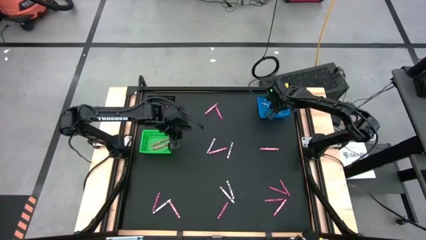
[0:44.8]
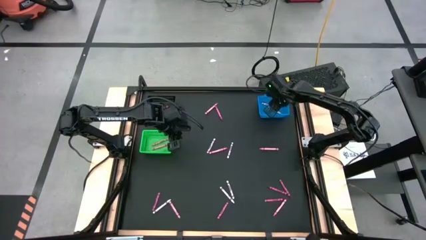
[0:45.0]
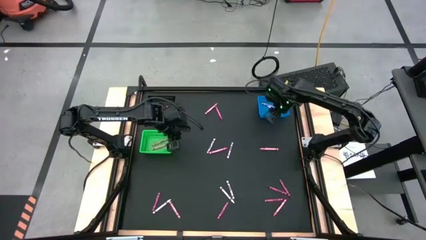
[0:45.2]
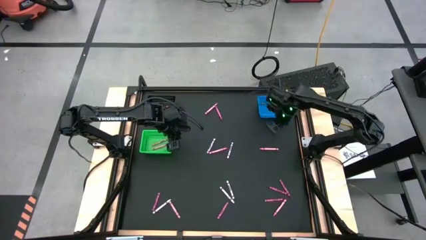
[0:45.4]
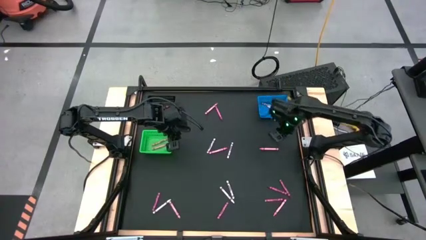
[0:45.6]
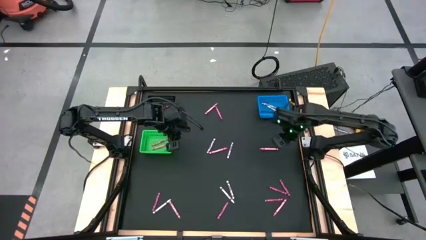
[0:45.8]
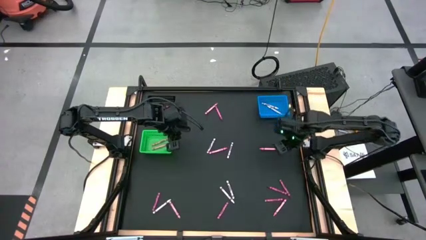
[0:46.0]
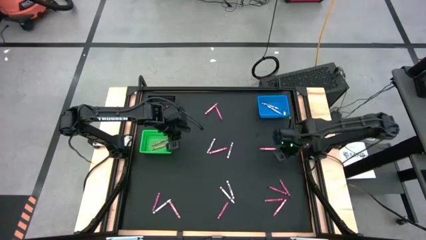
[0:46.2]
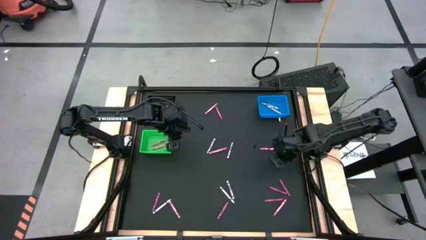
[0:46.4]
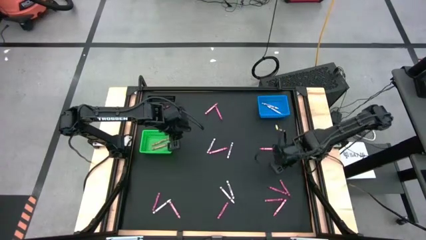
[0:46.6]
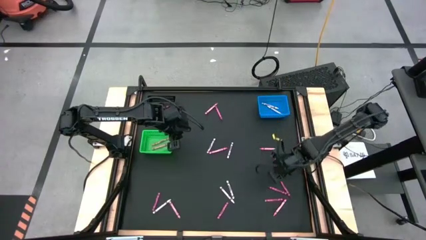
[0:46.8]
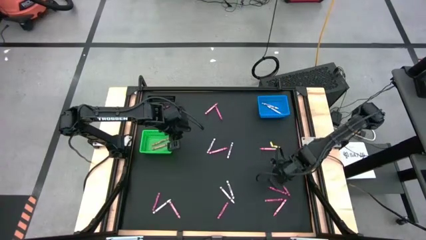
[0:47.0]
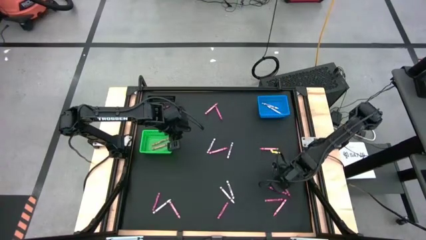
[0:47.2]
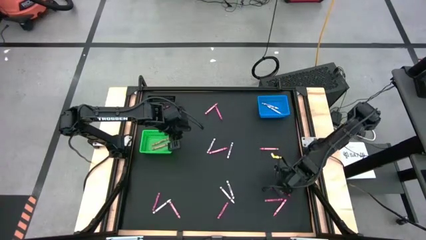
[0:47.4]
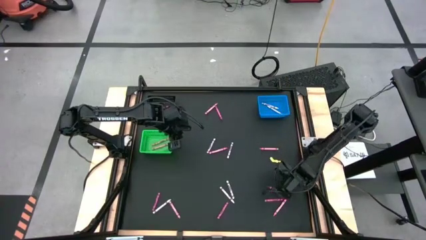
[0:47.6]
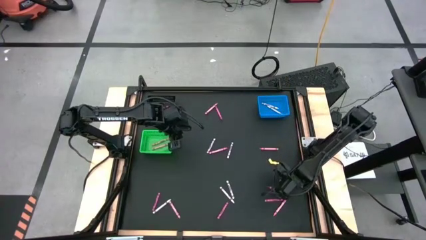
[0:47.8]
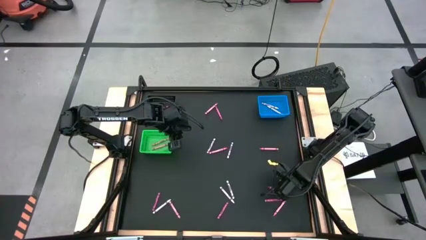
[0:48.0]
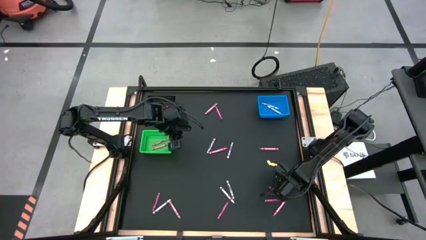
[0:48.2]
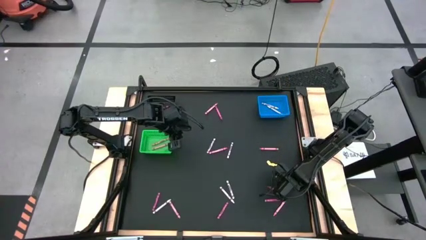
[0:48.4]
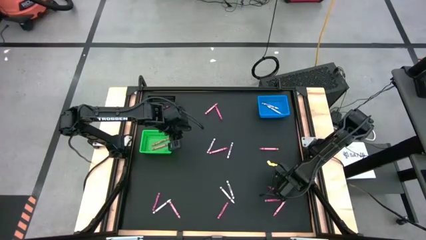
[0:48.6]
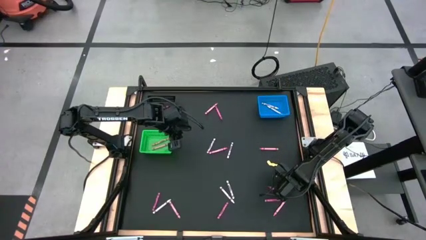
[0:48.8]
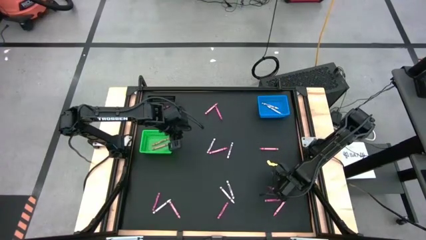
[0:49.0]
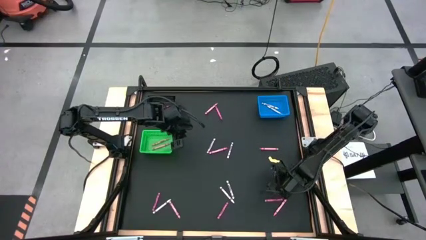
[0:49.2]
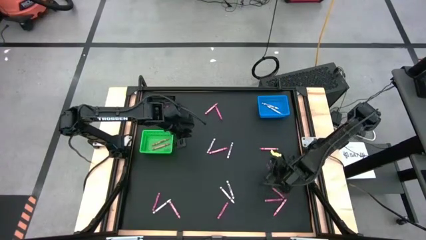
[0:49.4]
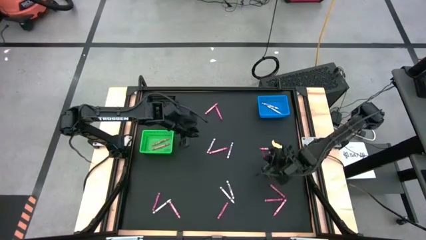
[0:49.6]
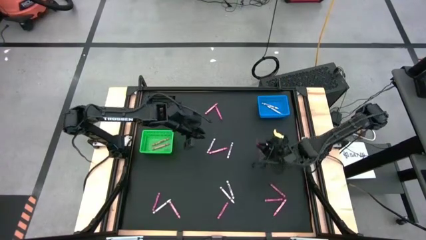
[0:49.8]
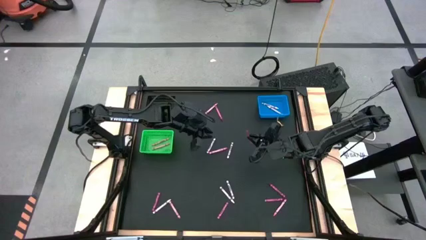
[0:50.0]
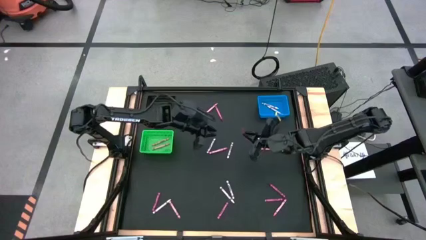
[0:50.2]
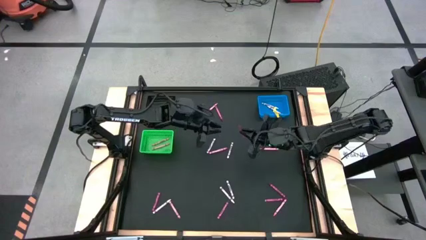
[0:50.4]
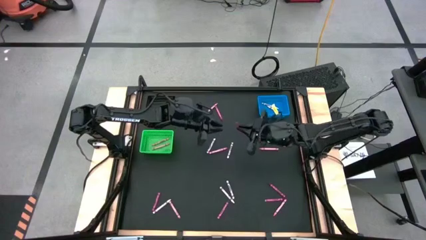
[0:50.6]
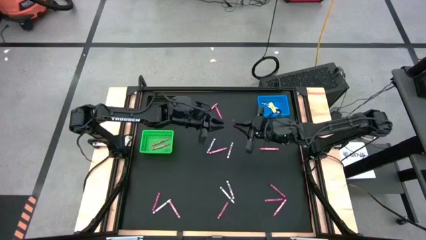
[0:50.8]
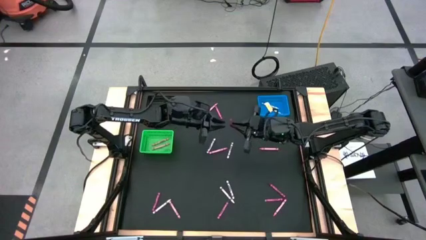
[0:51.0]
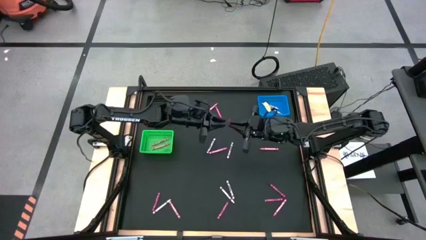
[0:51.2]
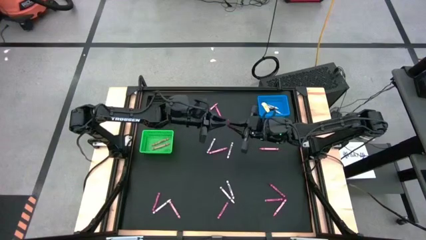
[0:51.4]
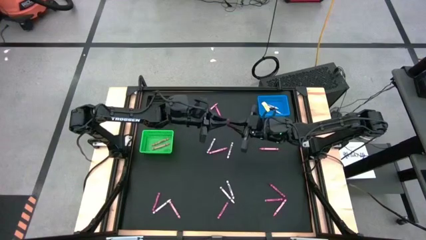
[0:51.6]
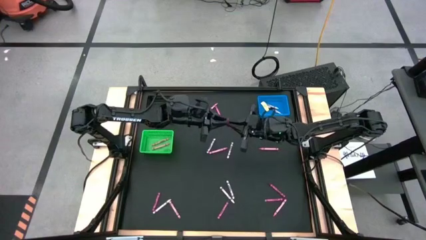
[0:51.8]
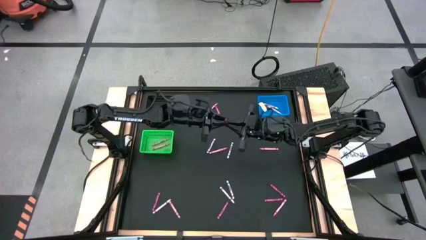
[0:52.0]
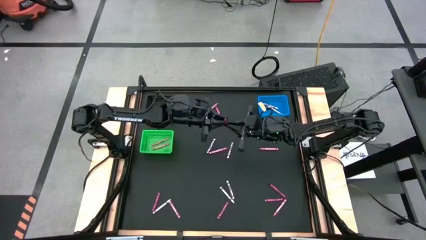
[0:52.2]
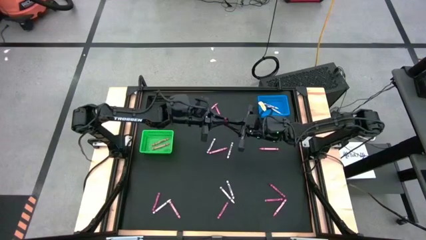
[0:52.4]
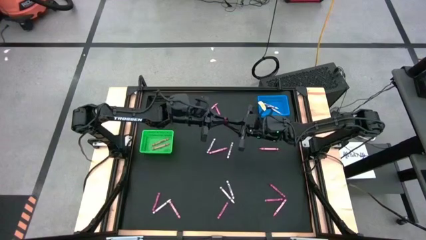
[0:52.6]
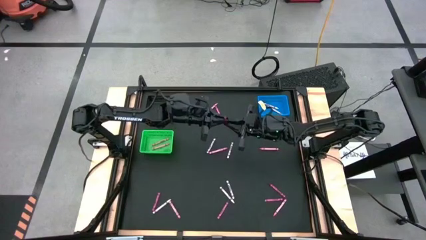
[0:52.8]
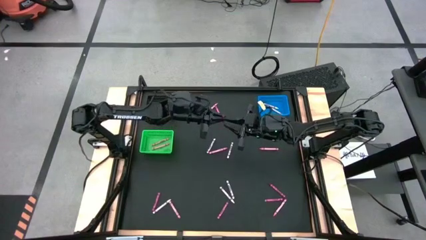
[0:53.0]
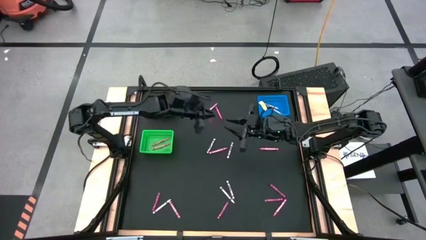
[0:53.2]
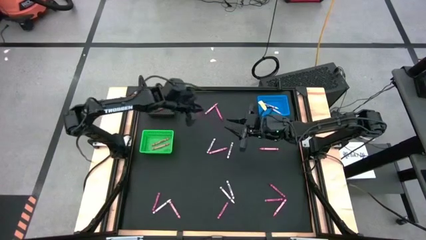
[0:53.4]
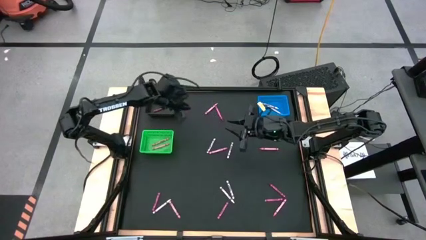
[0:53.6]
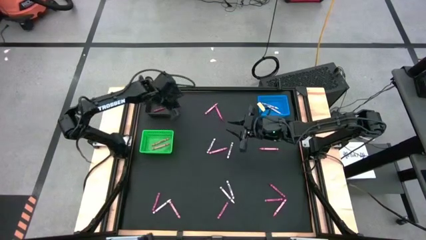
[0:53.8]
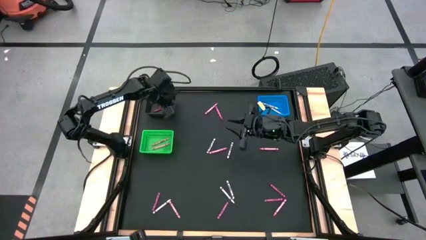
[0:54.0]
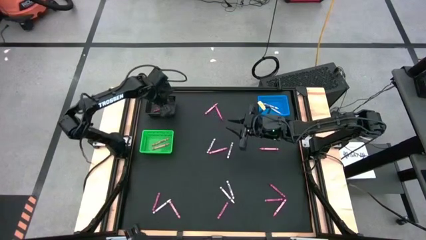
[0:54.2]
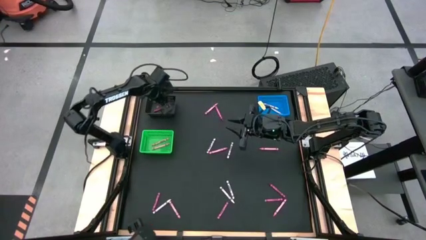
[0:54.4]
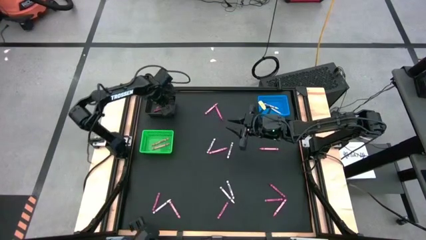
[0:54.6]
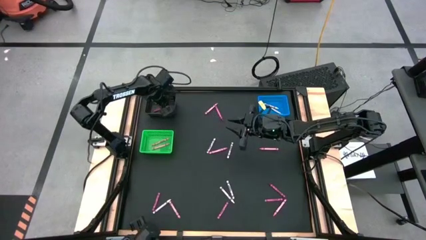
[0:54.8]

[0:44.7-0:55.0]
Task: Sort crayons
Put the red crayon into the black bin

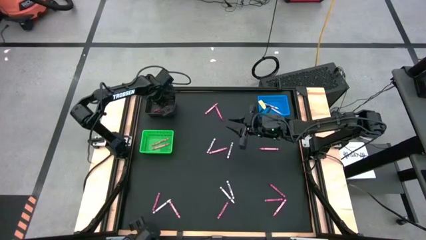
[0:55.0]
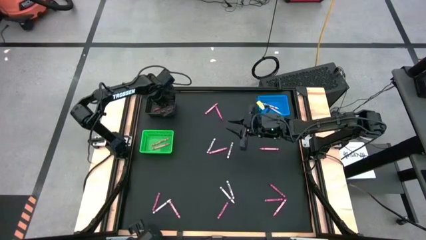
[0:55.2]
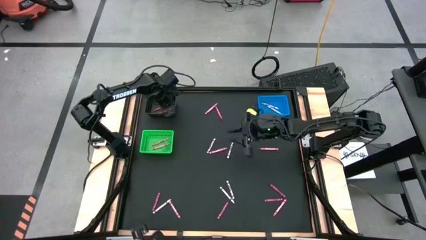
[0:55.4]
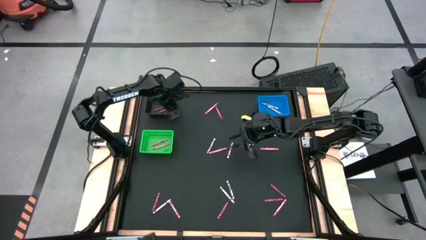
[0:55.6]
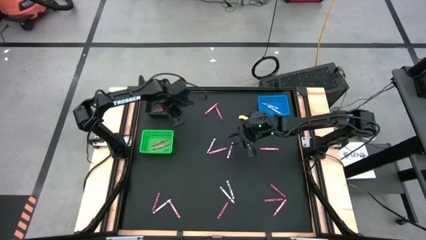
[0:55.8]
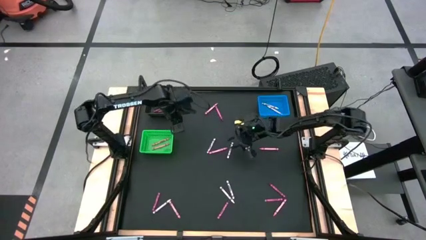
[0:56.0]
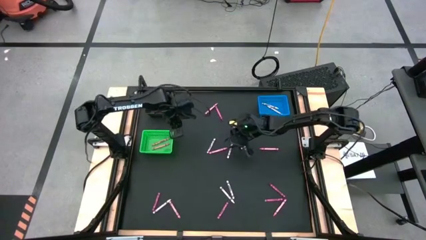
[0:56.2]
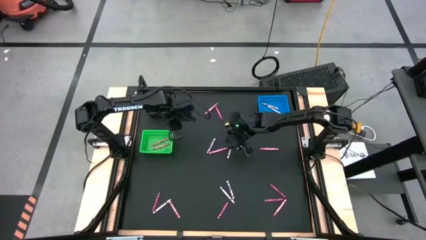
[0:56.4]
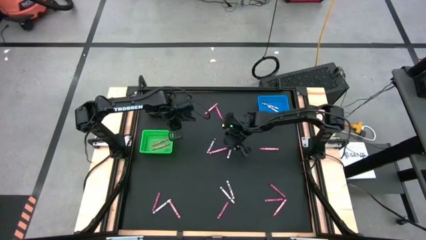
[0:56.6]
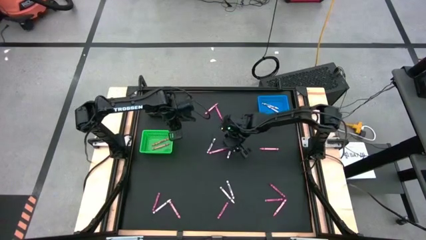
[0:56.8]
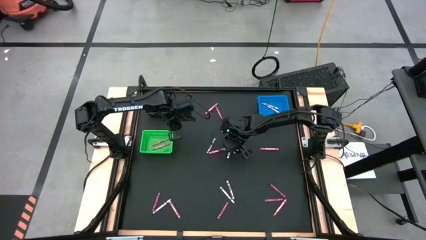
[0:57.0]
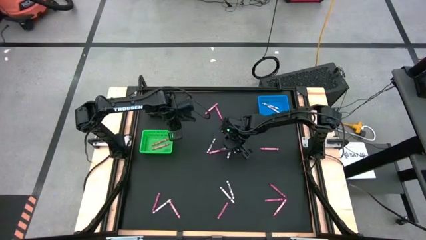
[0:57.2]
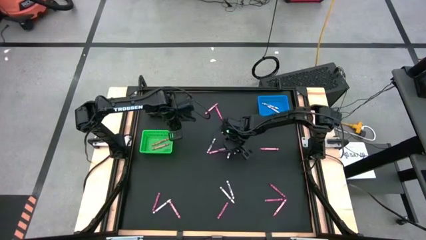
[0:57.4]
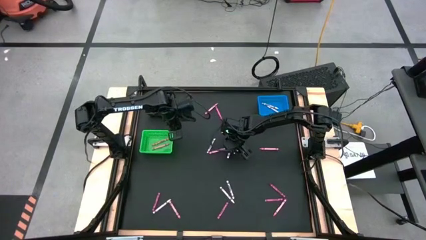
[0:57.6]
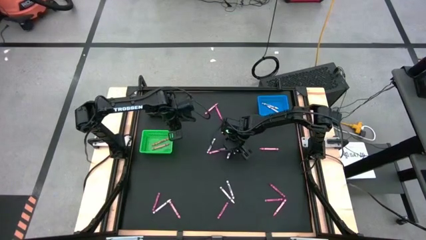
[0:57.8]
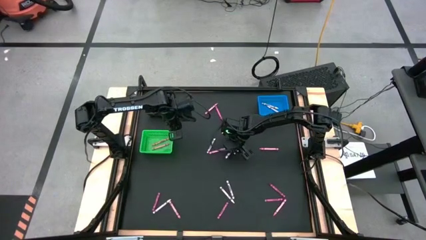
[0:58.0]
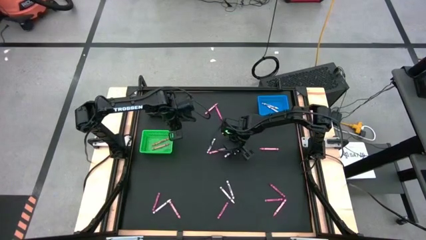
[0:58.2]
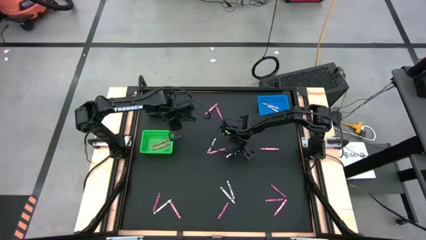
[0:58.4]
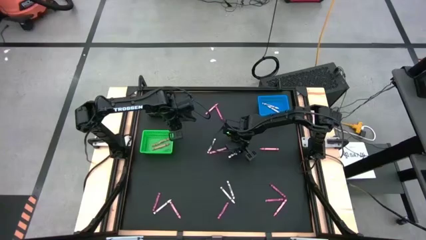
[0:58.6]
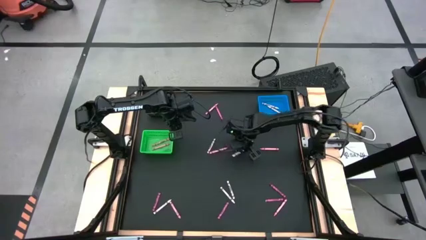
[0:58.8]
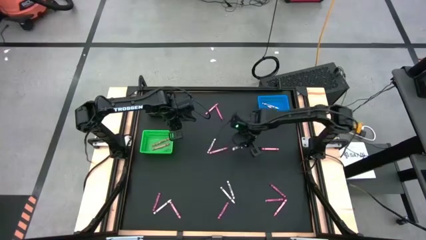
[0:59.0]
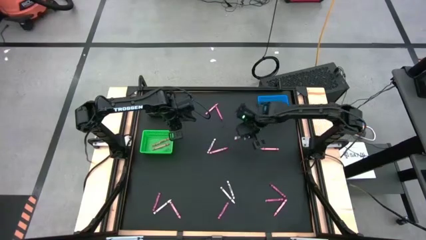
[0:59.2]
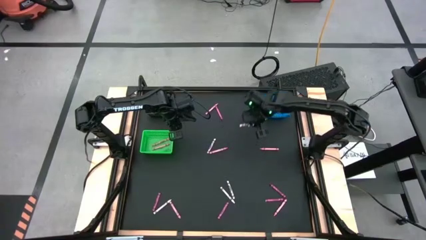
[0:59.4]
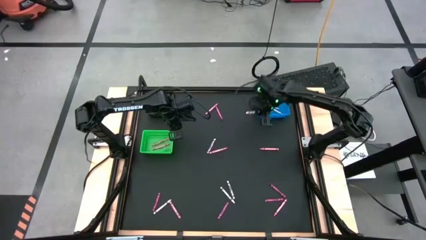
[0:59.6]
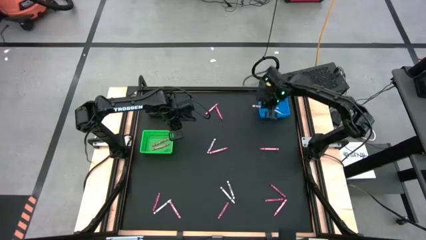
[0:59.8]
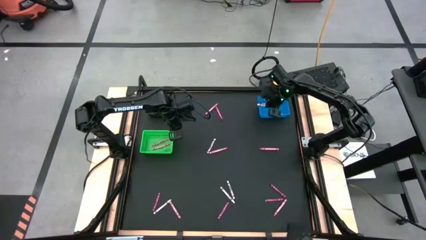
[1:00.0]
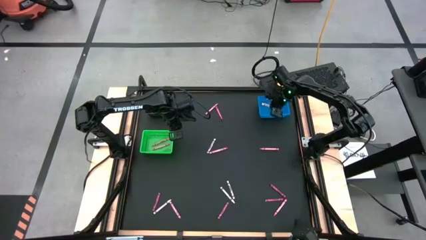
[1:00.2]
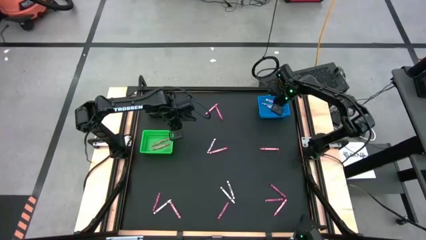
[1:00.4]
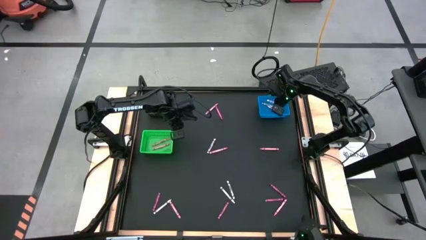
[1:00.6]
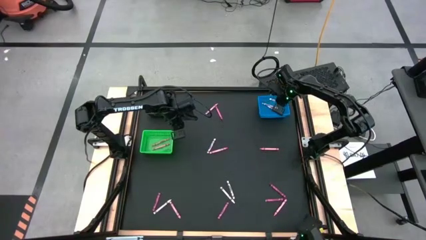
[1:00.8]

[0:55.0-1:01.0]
Put the white crayon into the blue bin
